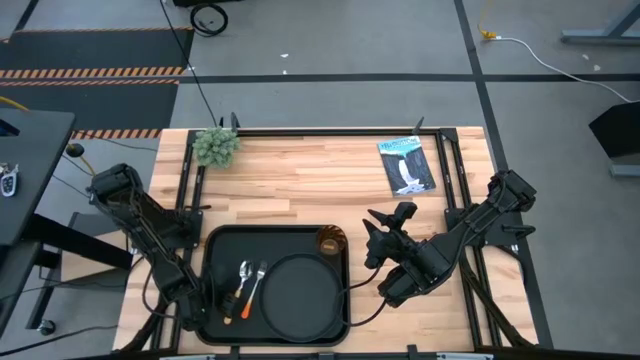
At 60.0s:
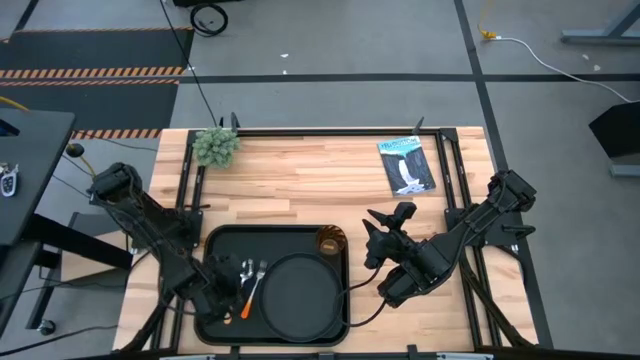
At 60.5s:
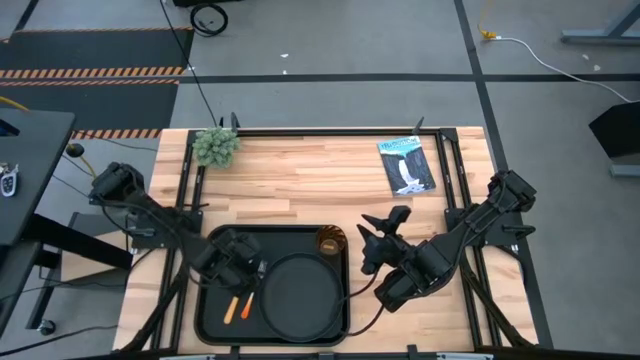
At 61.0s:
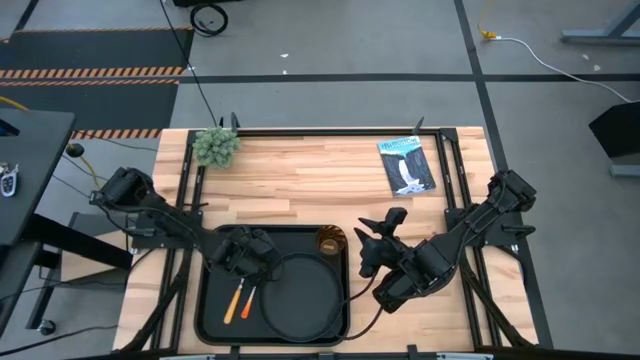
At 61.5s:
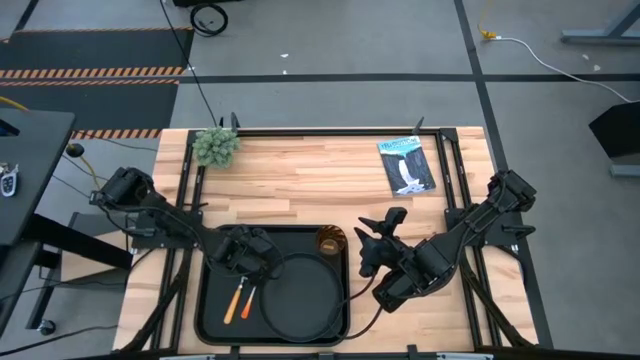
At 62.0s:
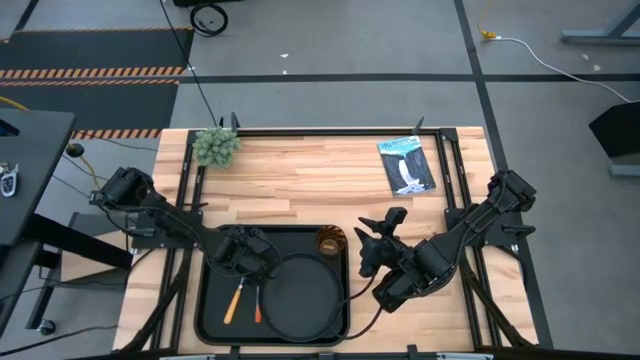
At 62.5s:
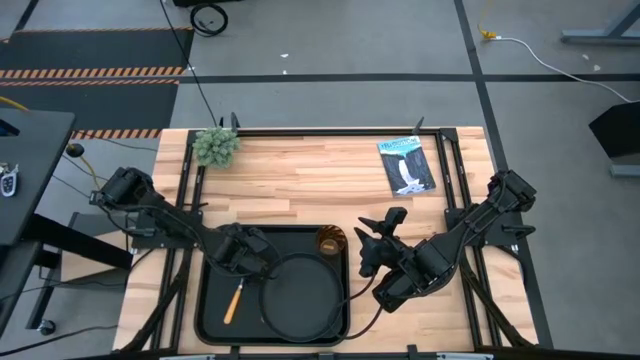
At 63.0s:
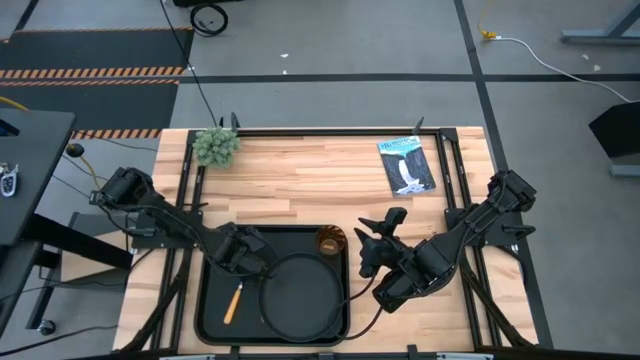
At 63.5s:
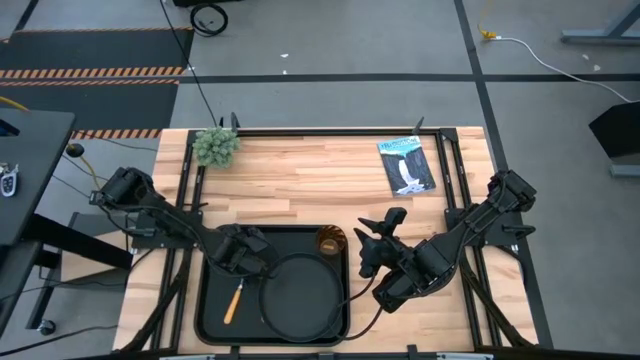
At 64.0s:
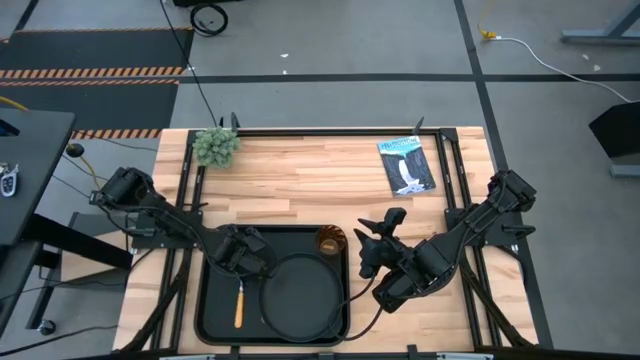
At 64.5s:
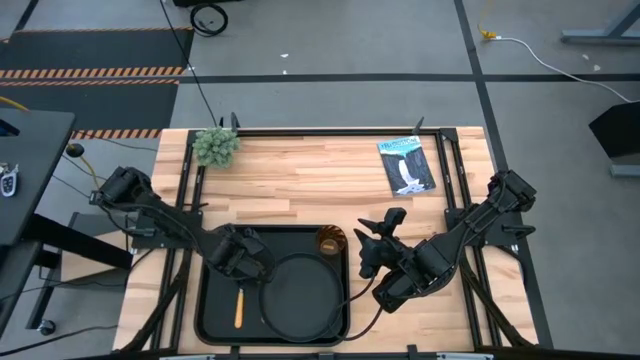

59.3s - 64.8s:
Task: Pick and place plate/cup/fork/spoon on tray
Adjust the brown spoon on the black tray

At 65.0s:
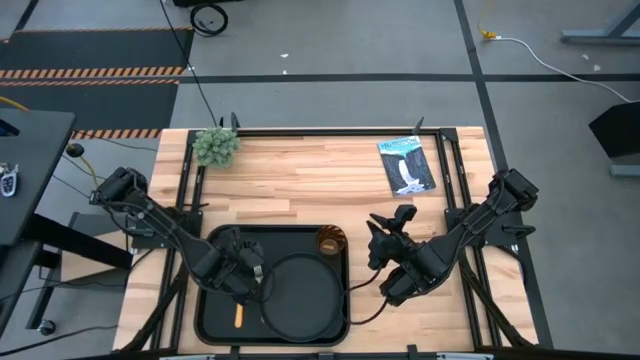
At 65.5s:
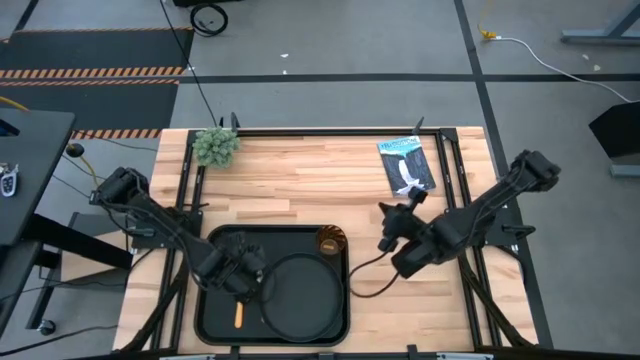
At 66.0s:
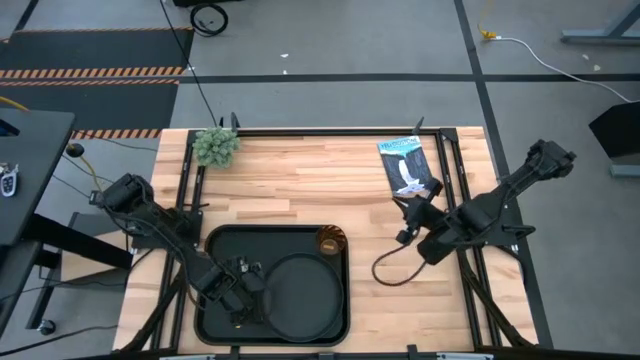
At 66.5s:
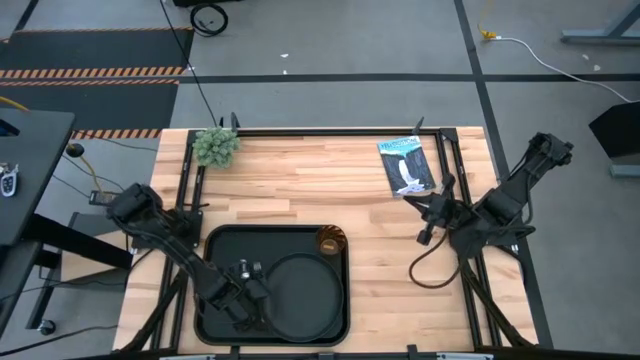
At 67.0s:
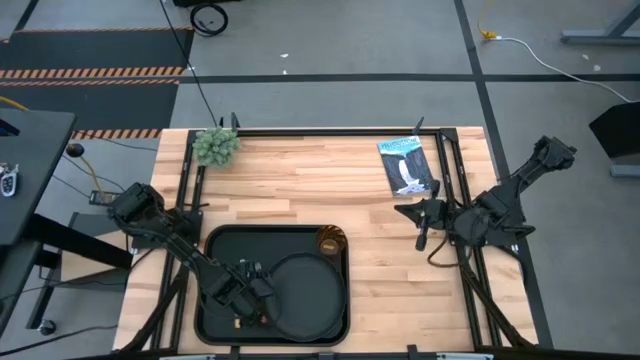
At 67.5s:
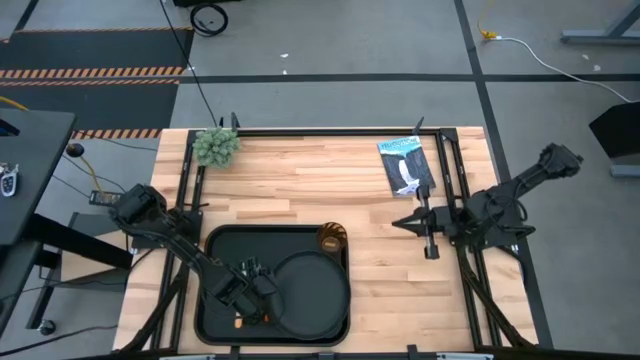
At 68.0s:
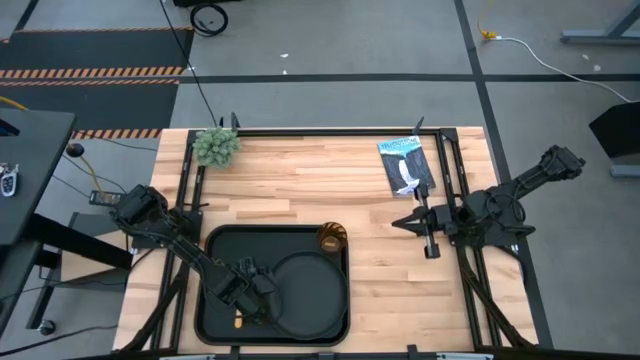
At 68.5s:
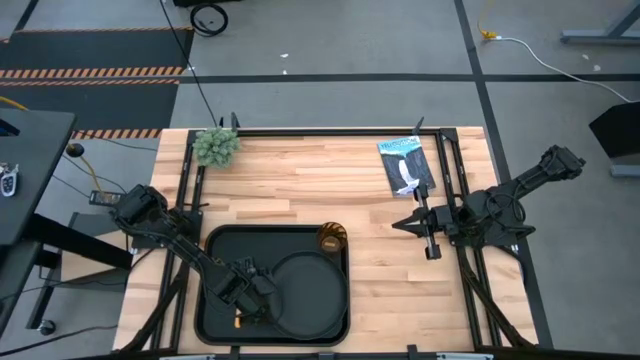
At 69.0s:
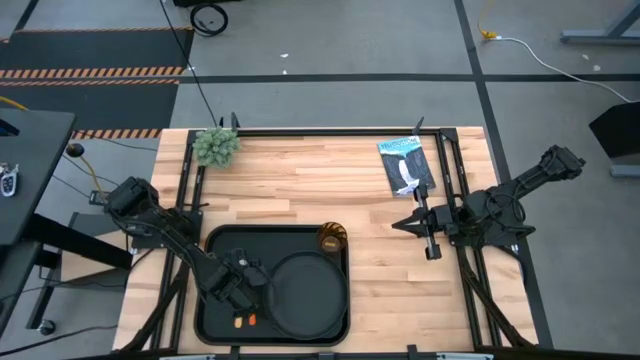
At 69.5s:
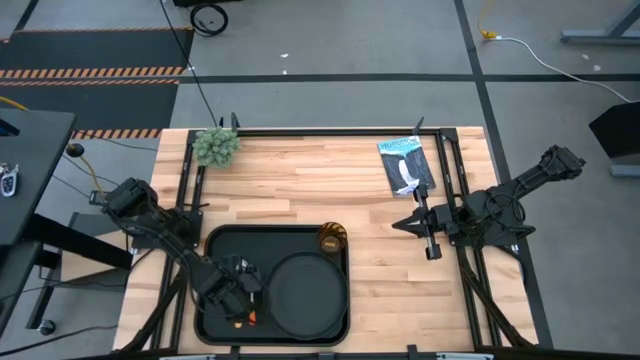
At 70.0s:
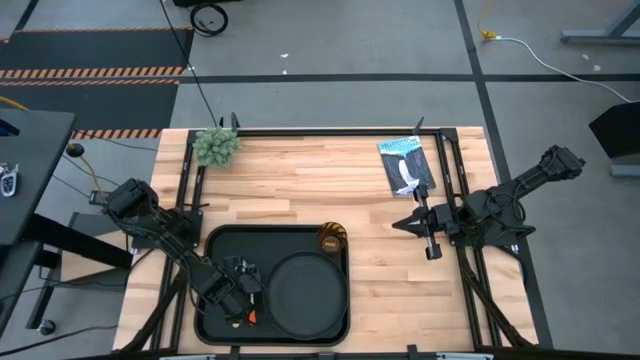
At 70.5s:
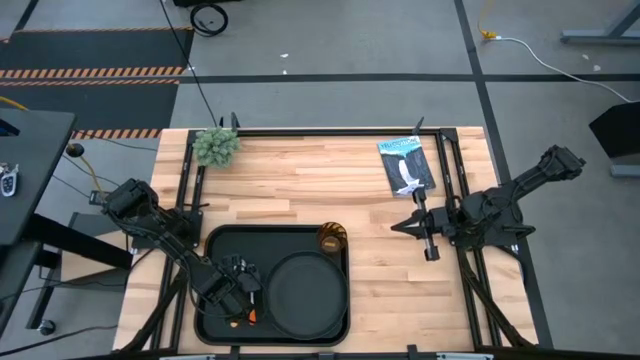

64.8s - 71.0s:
Adjust the orange fork on the black tray

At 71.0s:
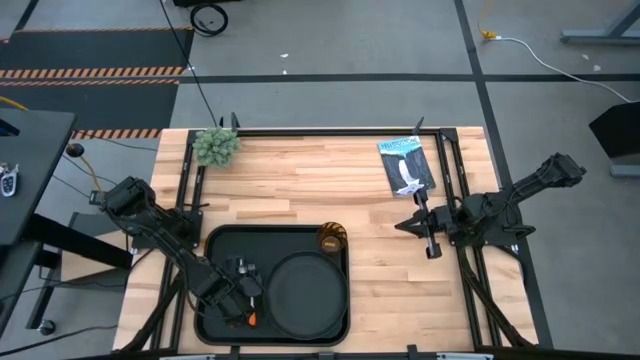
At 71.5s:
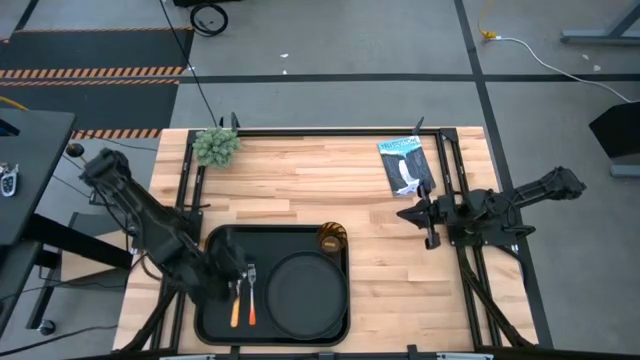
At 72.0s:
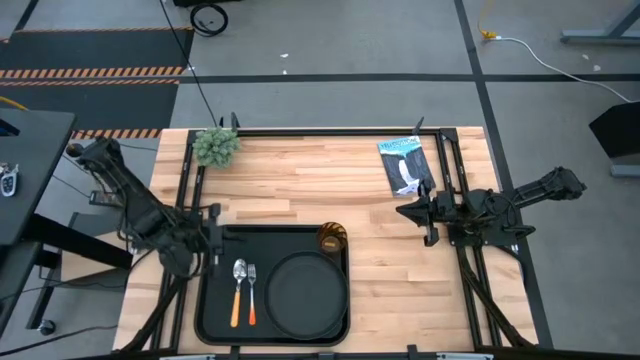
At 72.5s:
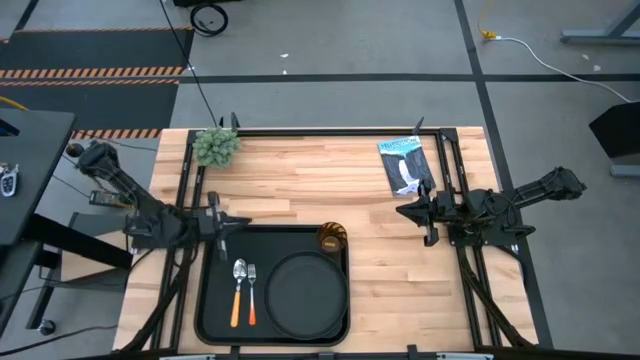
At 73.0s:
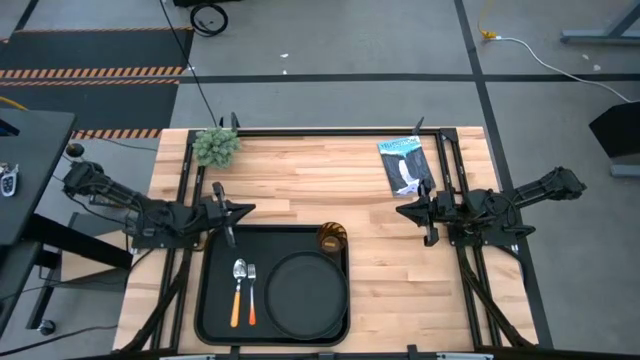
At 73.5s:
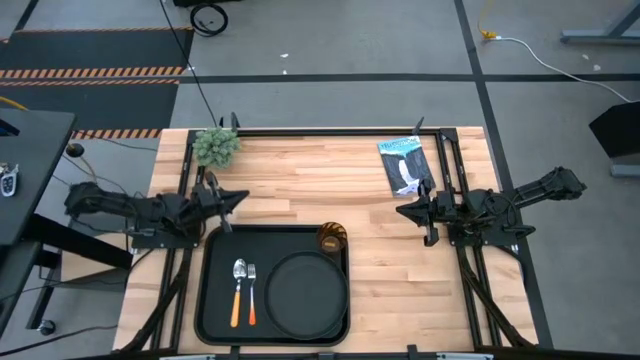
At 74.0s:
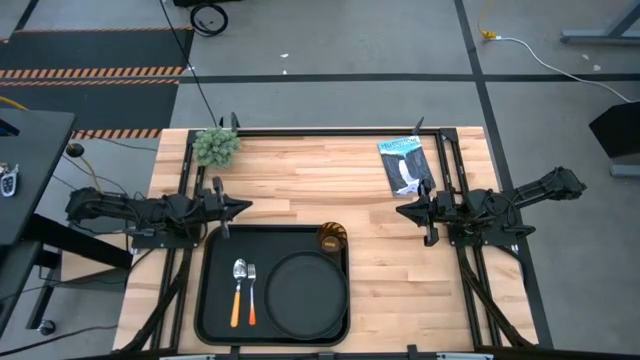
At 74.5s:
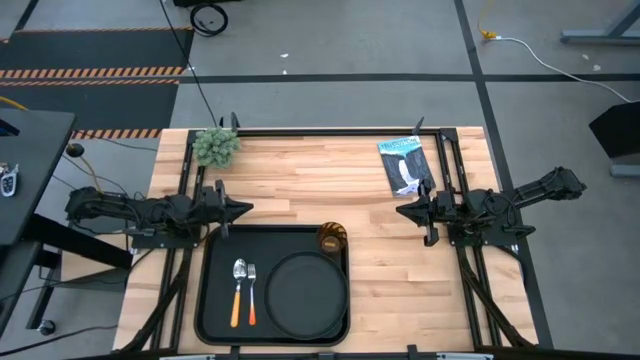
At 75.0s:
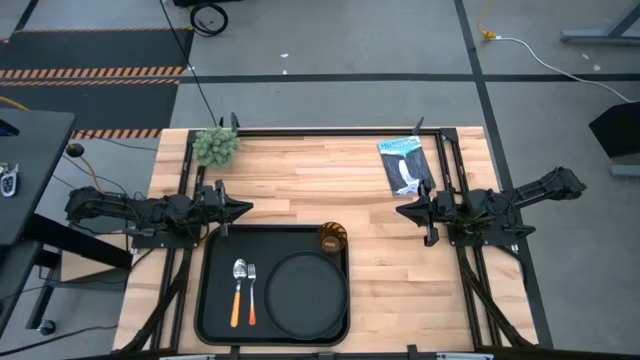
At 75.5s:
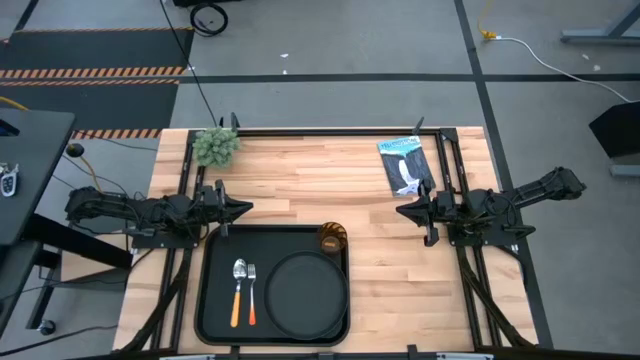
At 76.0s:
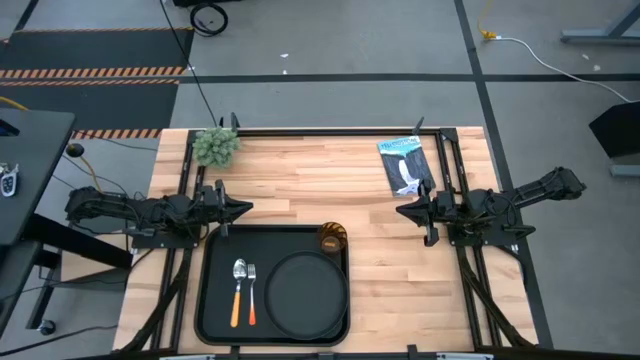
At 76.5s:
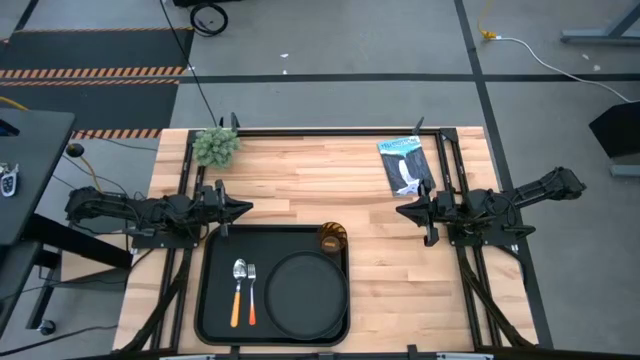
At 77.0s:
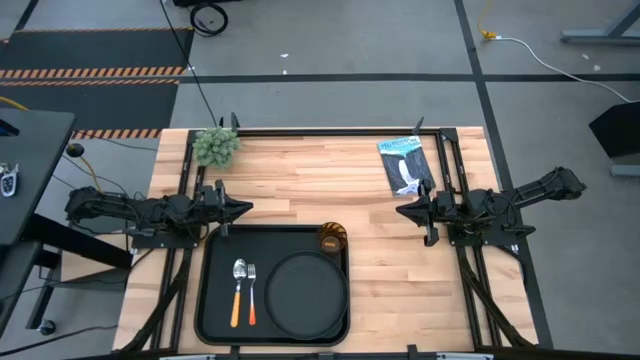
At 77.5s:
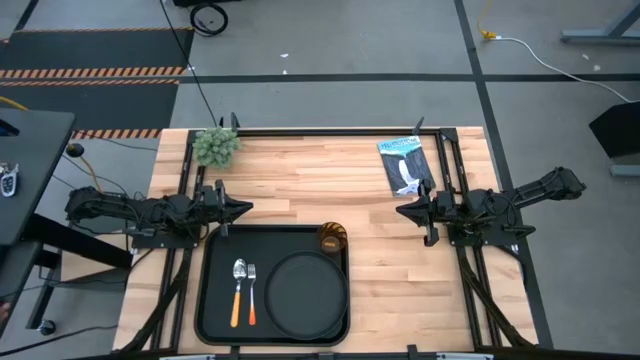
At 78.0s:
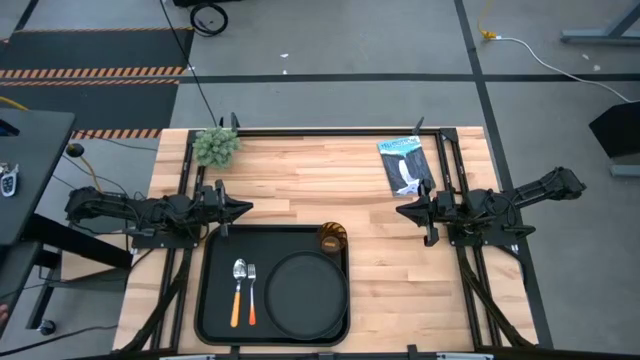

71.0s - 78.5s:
Return to Home Position

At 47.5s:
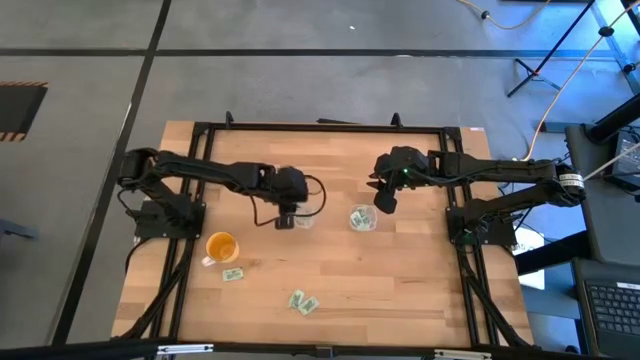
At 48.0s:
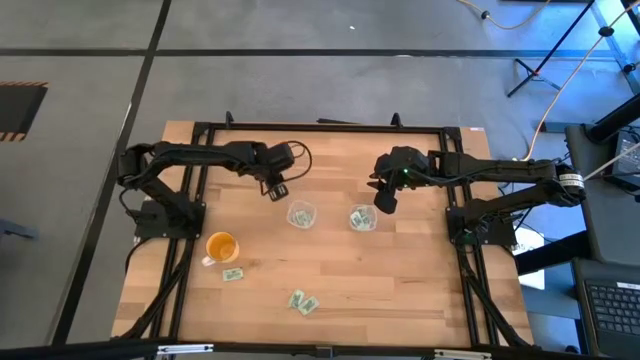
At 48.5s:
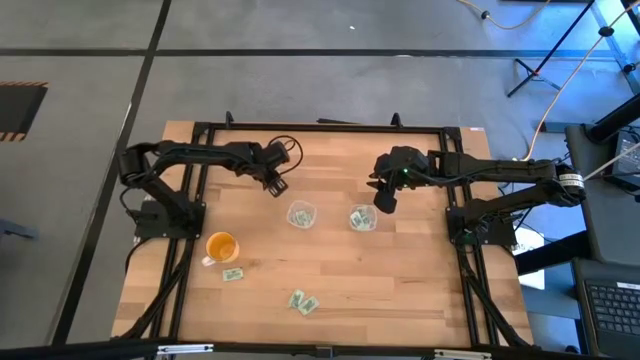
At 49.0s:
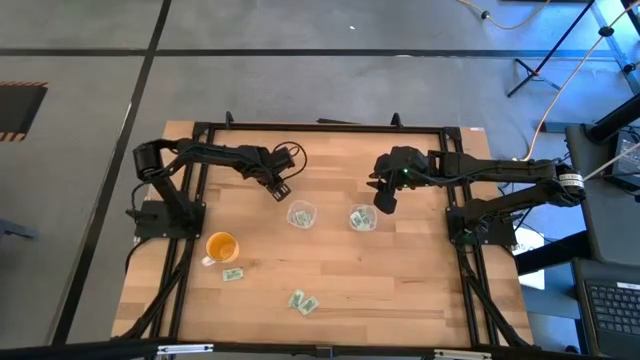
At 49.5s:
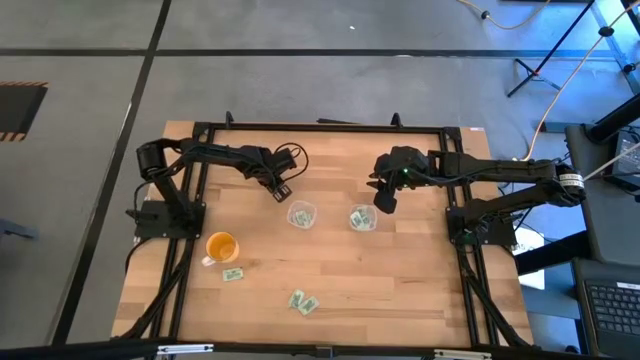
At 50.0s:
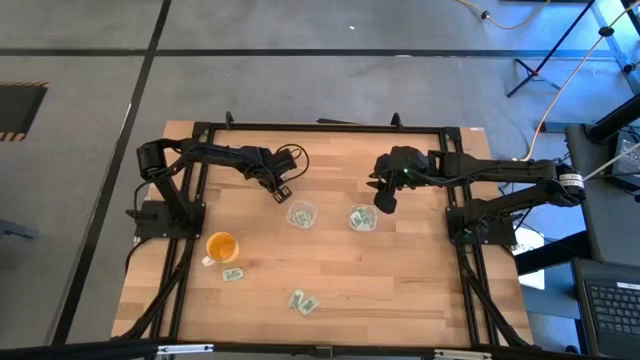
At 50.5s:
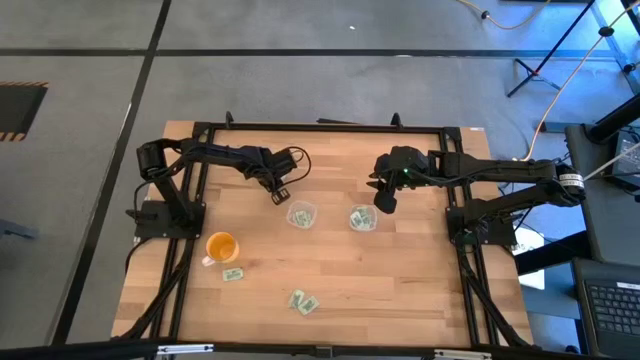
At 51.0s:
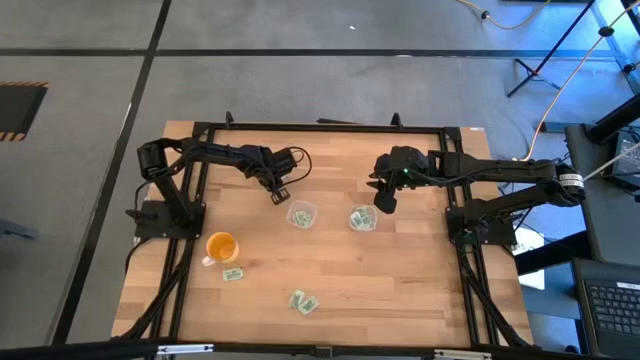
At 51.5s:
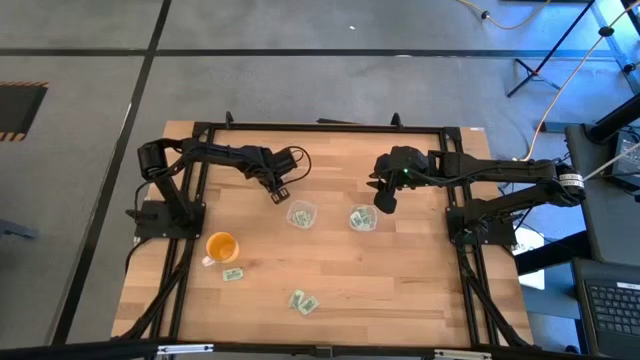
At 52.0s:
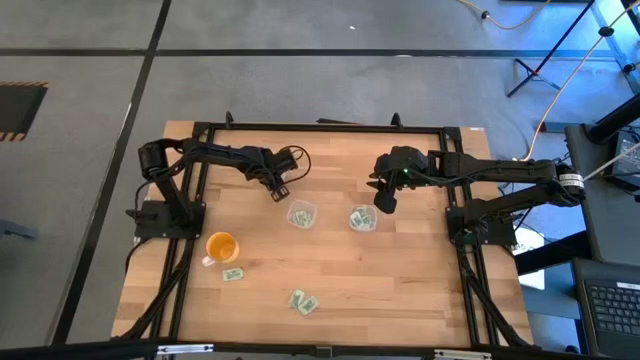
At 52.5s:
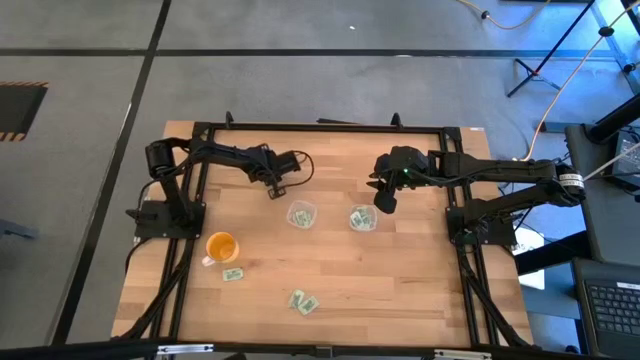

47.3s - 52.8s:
Task: Pick and place Stevia / Truvia into bins
Put the stevia packet into the left transparent container
